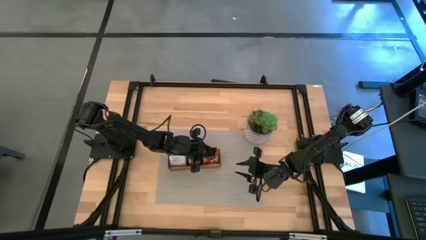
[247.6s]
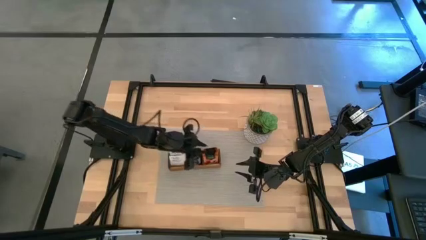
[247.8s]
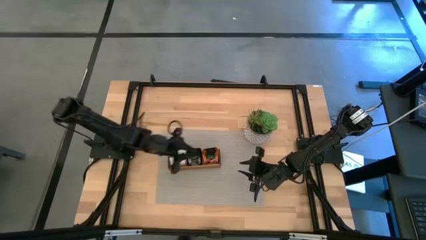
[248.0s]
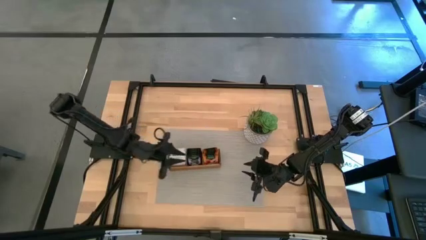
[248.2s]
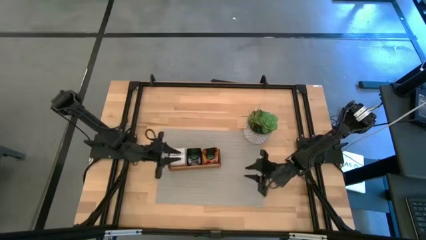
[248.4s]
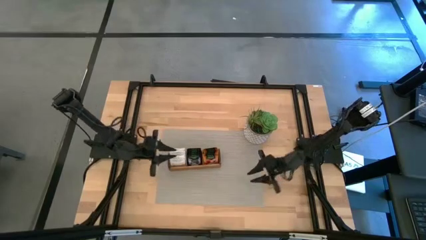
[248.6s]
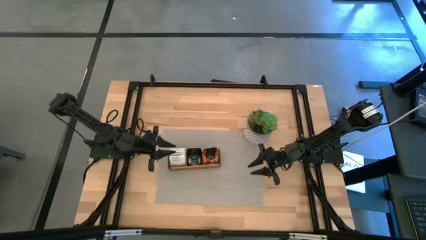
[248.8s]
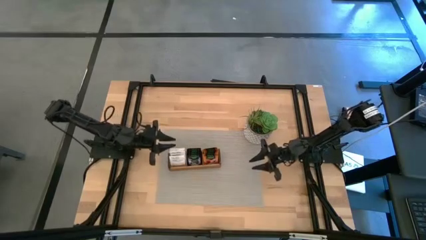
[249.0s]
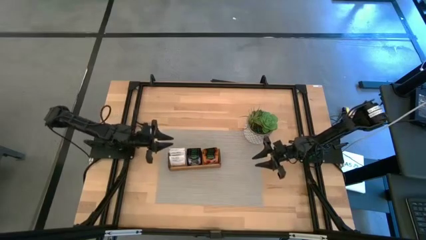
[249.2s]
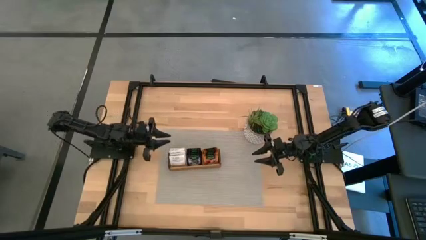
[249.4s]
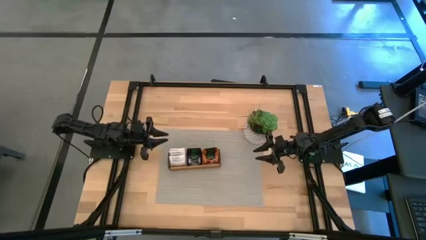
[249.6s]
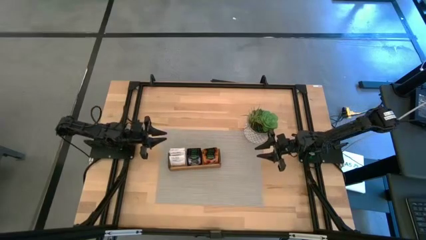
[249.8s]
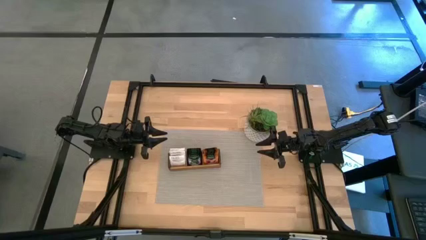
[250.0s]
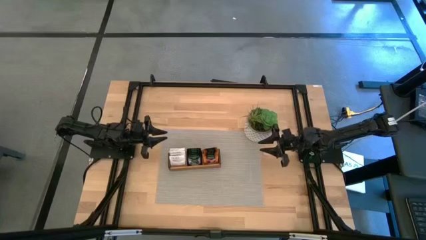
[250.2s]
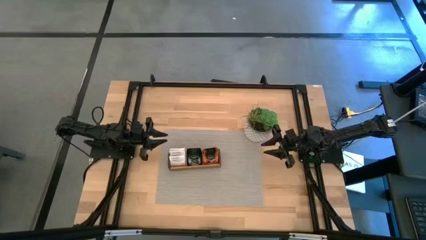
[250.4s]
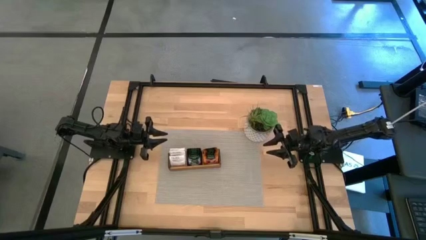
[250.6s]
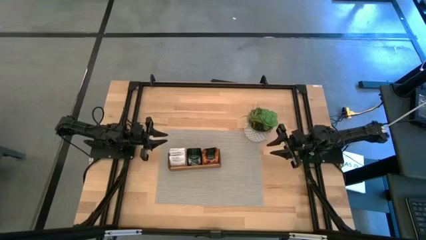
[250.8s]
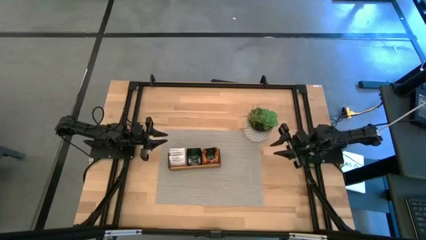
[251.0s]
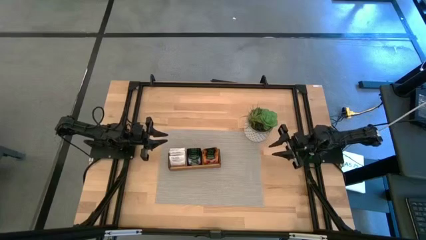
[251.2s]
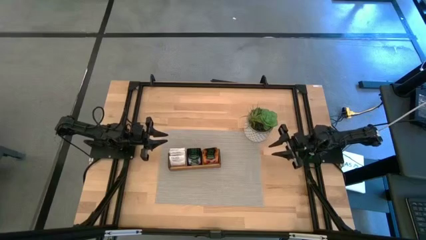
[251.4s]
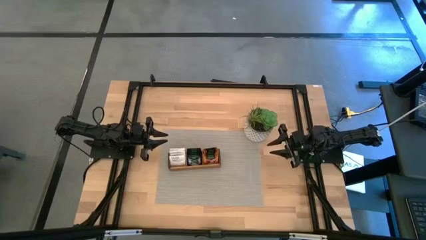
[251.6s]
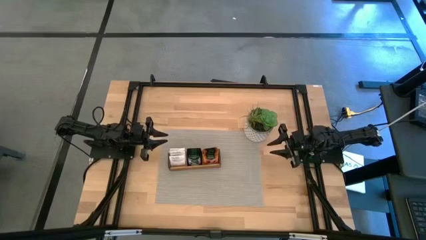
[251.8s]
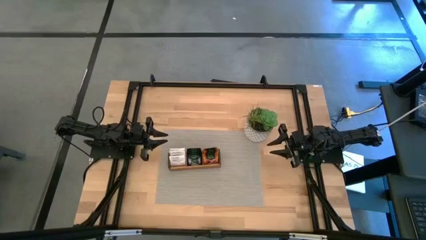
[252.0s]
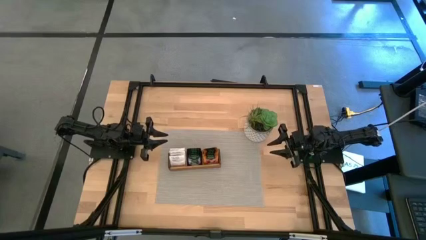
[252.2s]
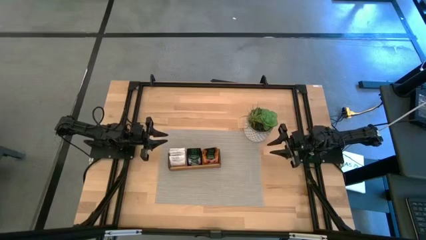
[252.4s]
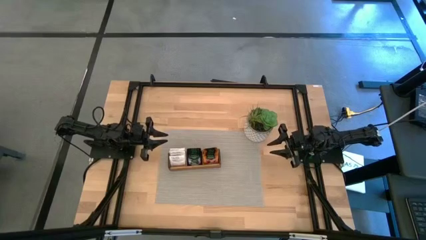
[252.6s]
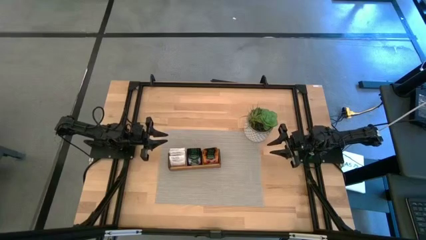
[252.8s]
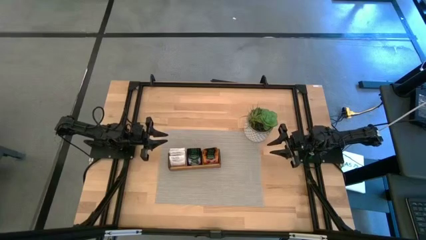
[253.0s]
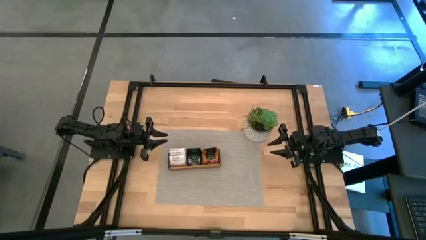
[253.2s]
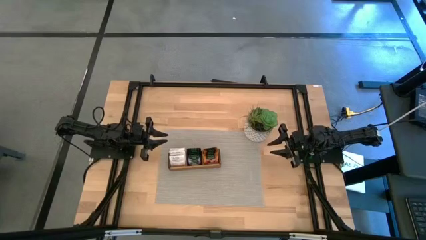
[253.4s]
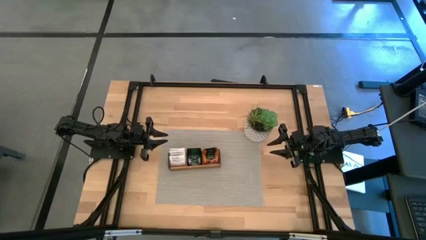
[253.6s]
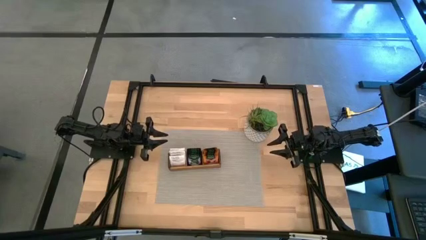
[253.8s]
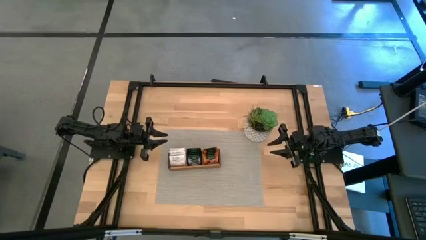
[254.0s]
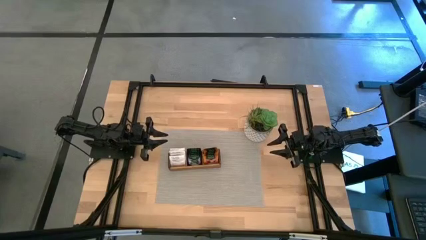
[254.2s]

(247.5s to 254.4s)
Task: Pick & Place Tea
Return to Home Position

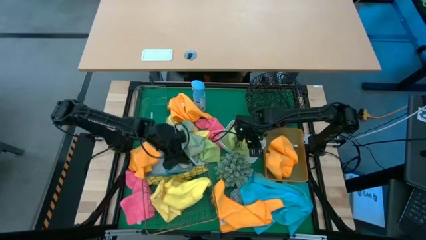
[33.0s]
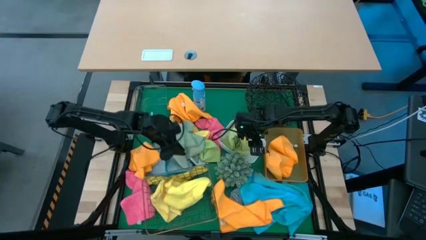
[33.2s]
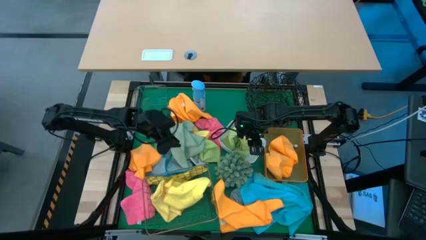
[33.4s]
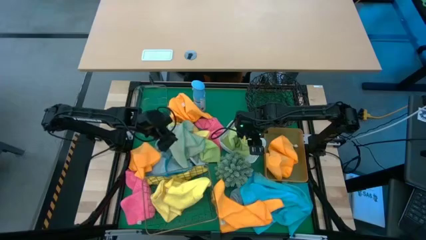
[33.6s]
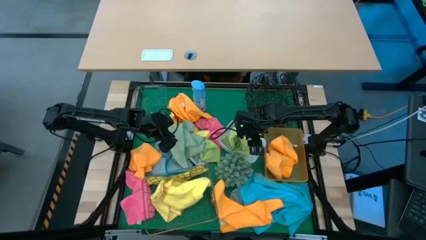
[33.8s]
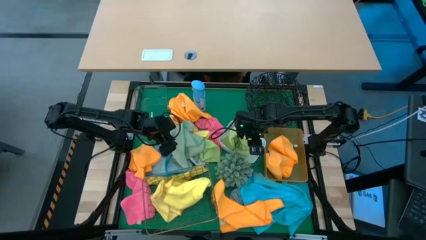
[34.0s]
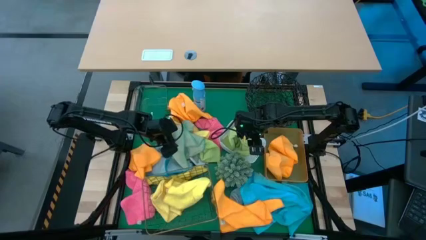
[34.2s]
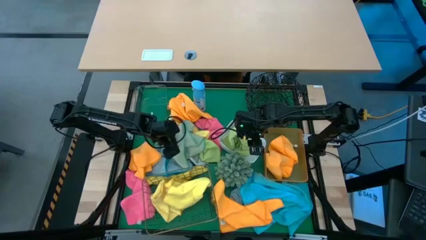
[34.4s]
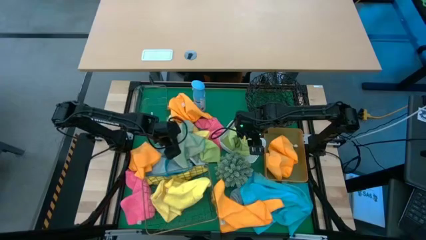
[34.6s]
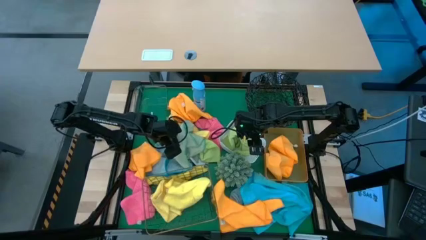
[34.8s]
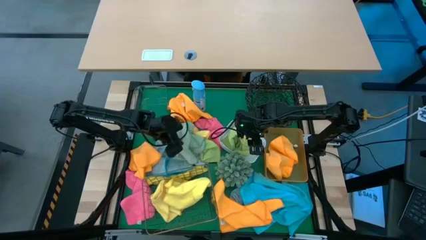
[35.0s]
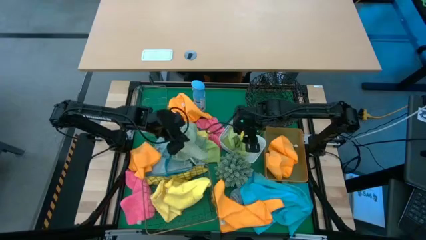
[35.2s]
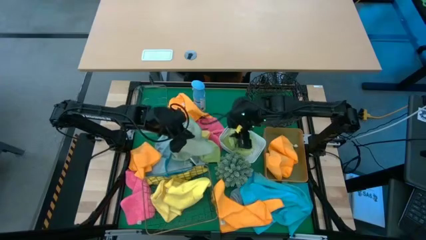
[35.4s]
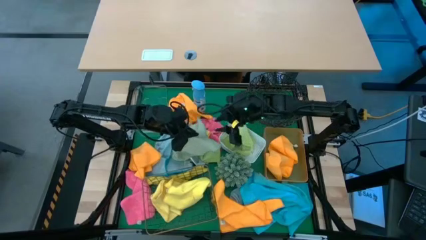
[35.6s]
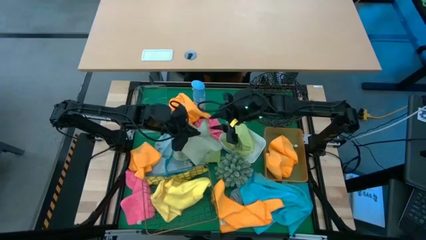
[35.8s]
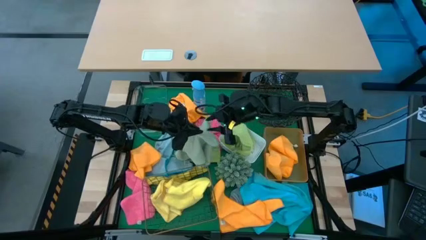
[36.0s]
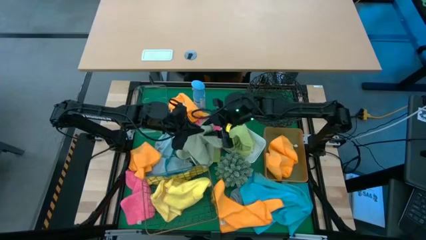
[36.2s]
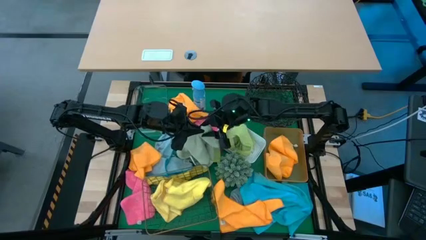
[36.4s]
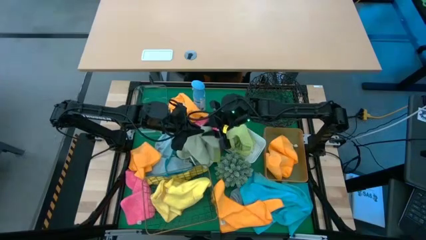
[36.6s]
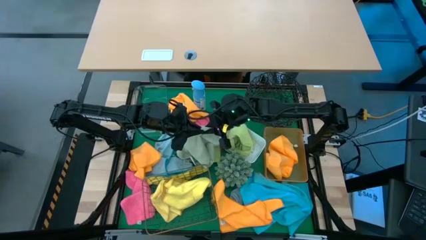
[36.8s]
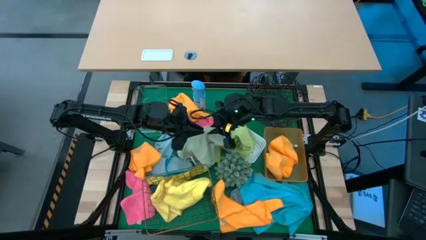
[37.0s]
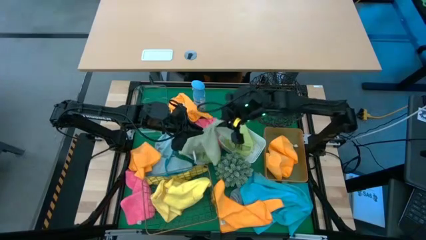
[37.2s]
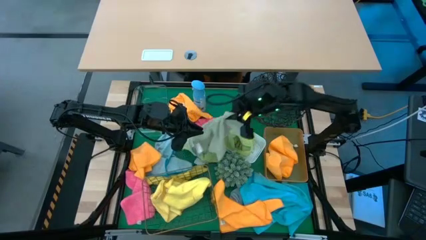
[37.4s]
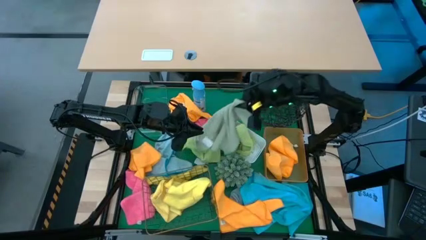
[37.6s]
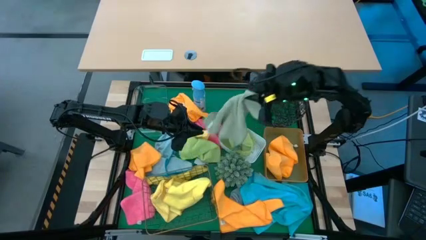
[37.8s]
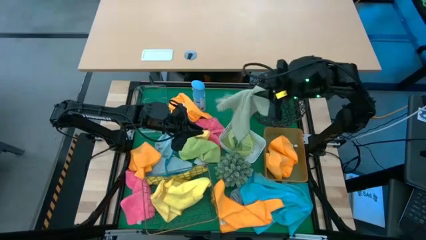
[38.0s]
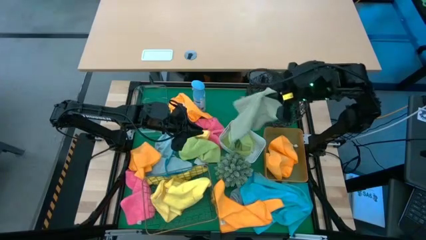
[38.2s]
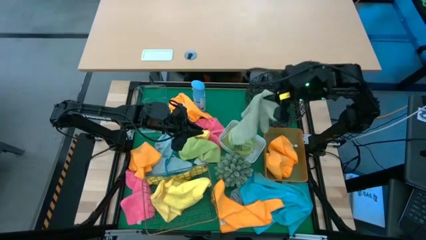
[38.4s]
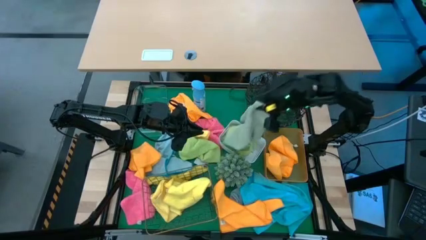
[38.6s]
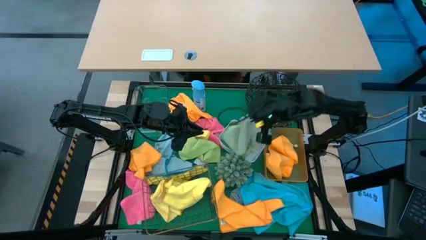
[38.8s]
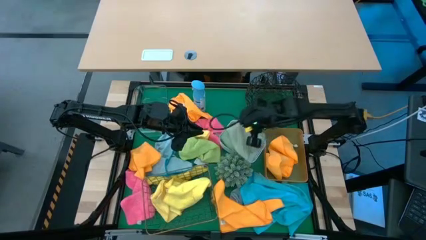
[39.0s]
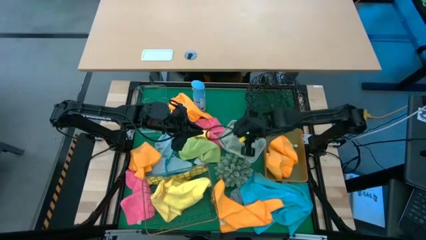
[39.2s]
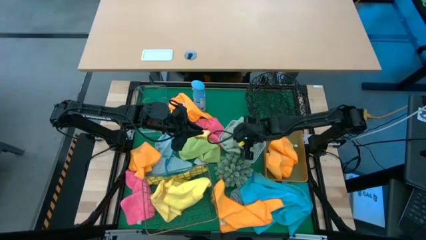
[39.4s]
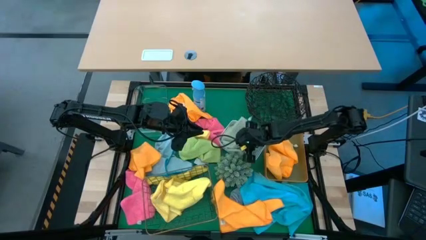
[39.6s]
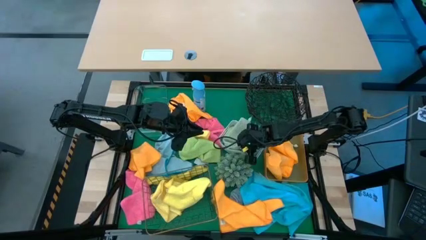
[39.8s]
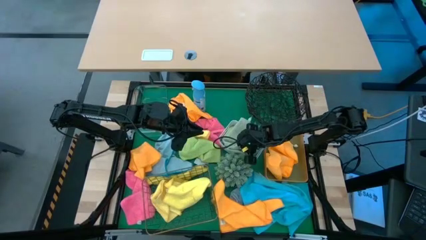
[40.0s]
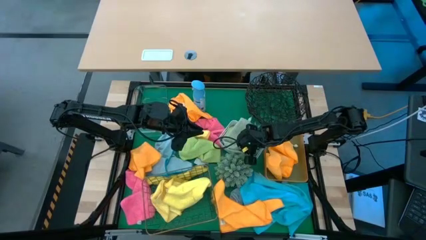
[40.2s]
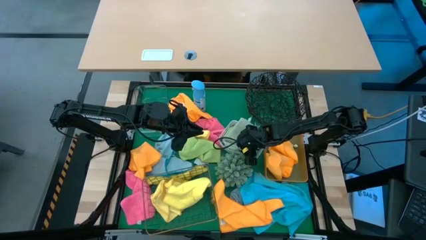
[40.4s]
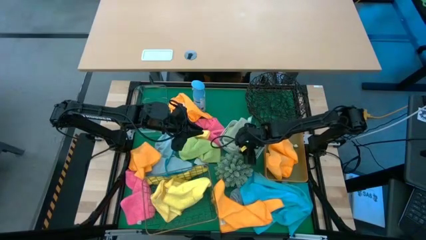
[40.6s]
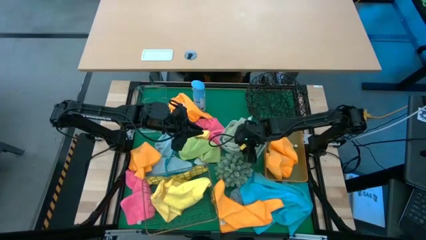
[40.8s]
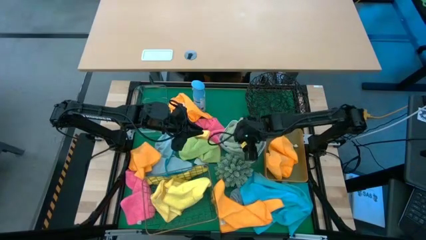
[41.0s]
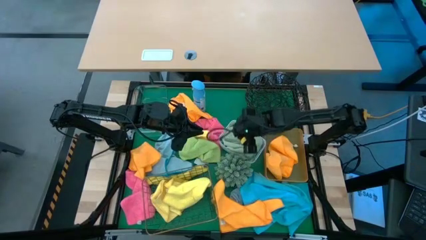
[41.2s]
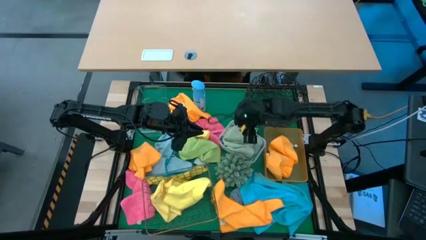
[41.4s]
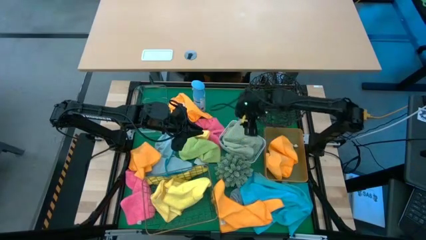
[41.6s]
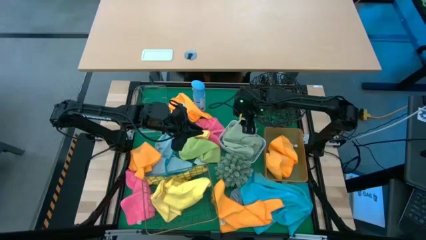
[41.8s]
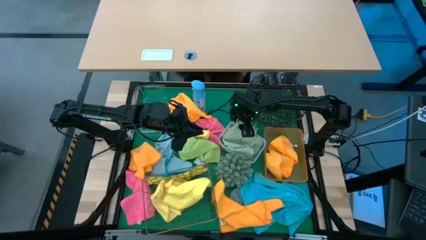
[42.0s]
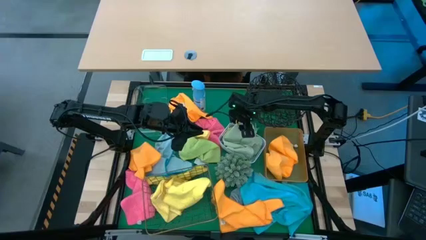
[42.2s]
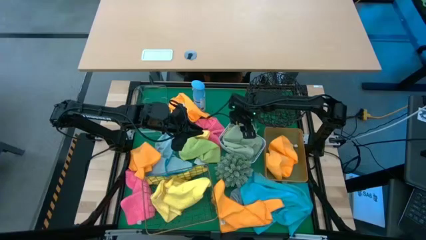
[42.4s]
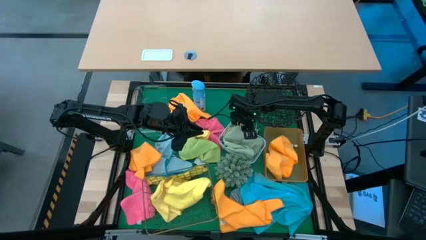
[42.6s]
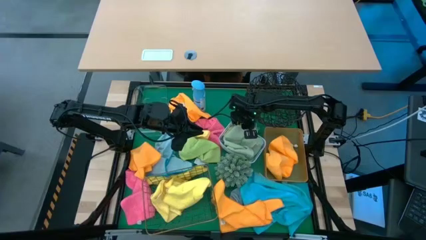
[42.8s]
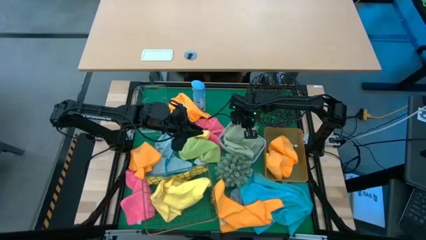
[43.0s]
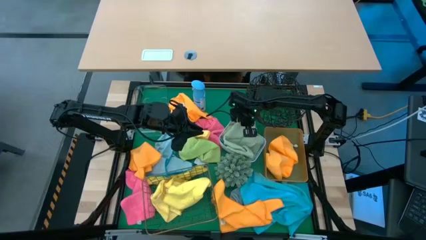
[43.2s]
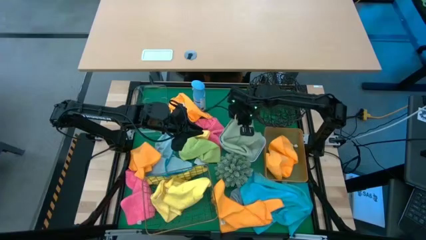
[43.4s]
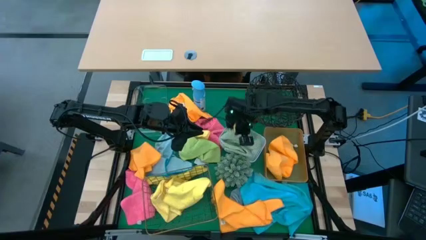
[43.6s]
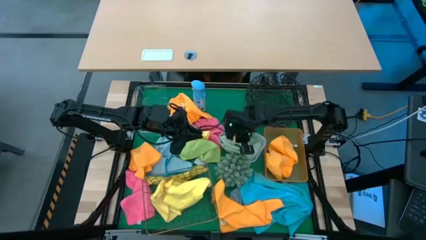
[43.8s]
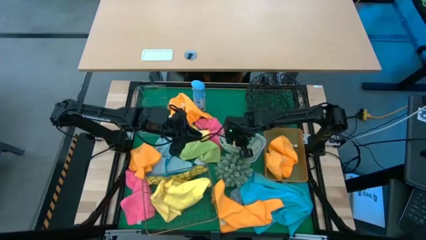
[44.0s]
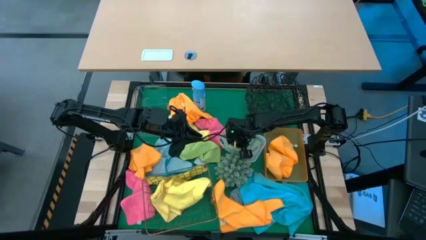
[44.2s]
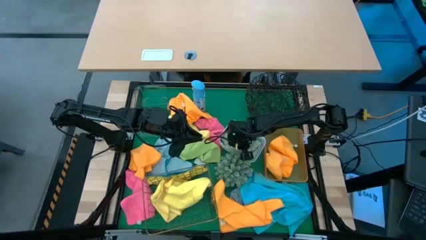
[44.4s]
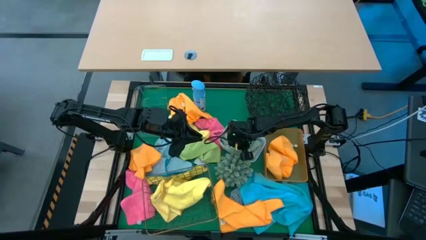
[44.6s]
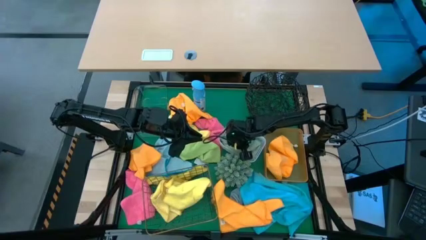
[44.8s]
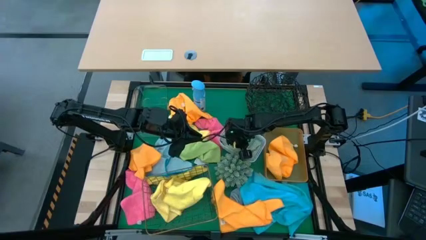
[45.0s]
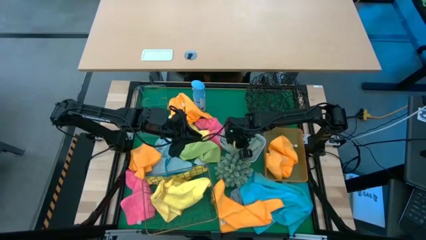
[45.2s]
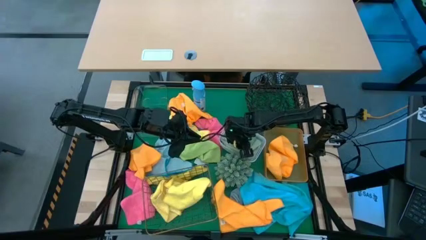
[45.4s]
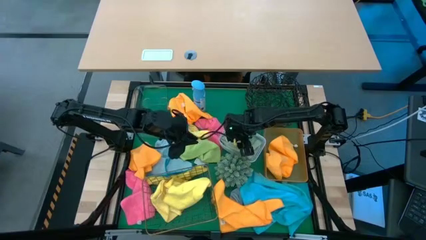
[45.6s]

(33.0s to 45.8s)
Task: Sort microfiber towel by color & place in baskets
Put the green microfiber cloth into the white bin
